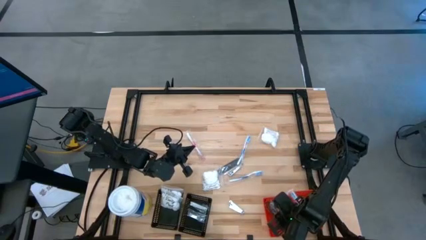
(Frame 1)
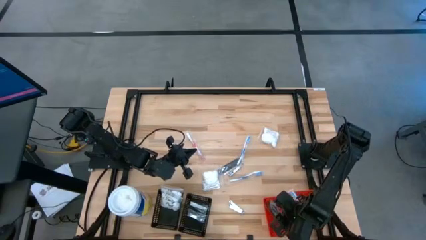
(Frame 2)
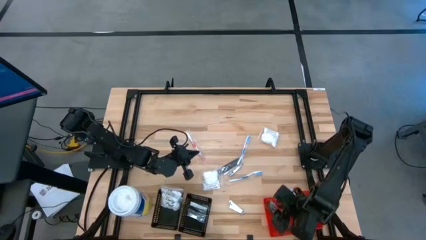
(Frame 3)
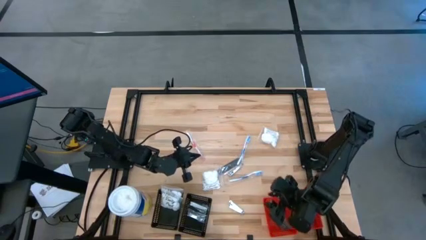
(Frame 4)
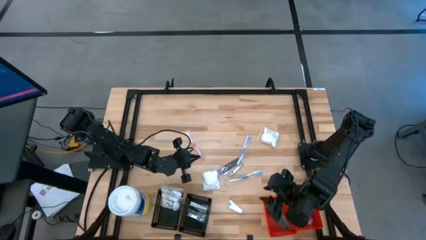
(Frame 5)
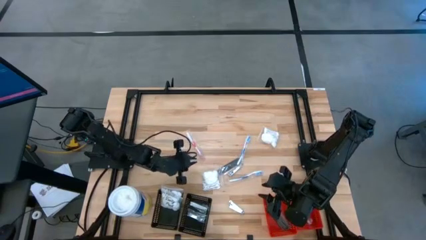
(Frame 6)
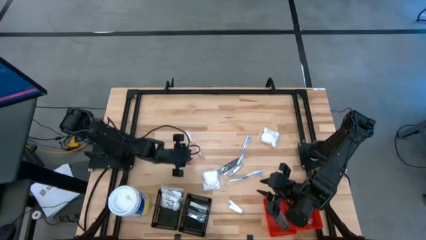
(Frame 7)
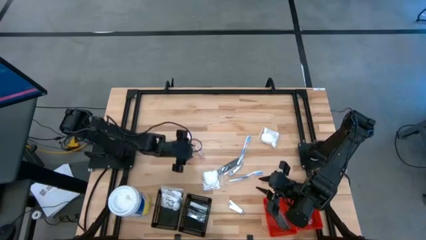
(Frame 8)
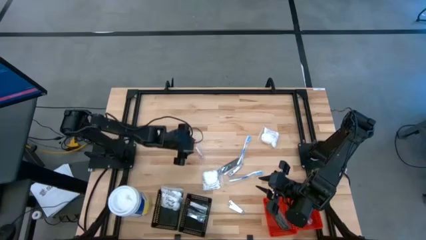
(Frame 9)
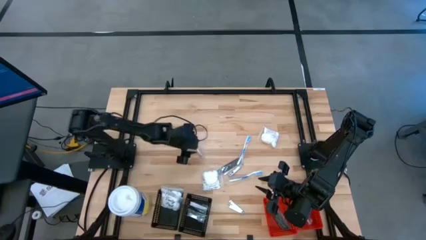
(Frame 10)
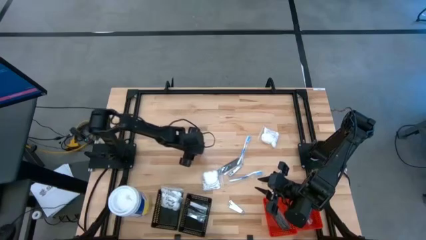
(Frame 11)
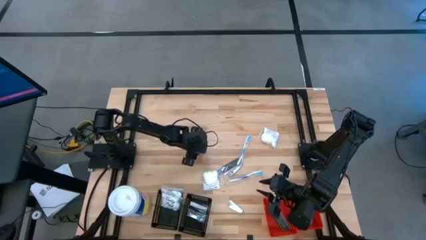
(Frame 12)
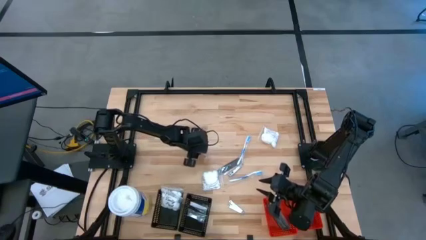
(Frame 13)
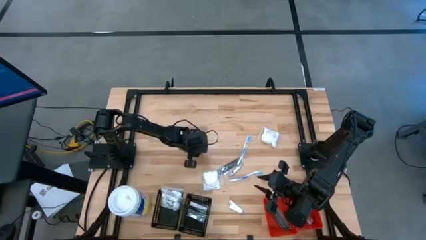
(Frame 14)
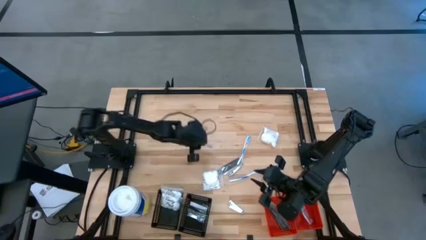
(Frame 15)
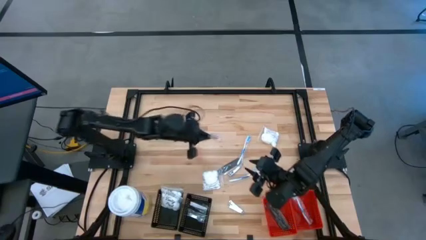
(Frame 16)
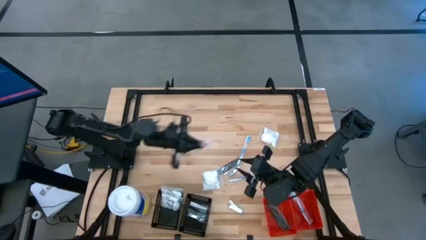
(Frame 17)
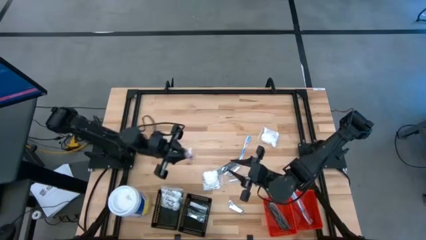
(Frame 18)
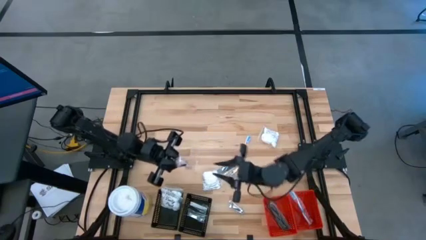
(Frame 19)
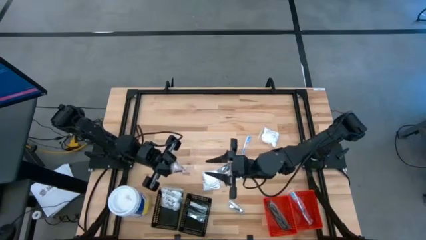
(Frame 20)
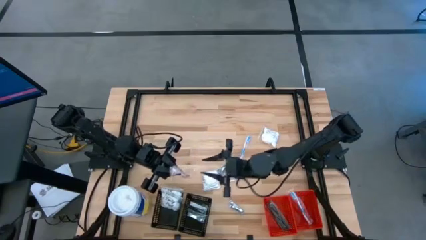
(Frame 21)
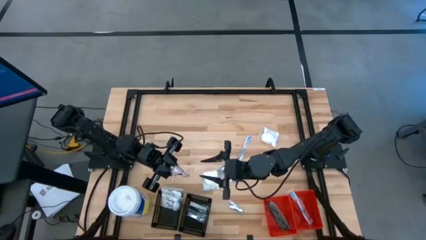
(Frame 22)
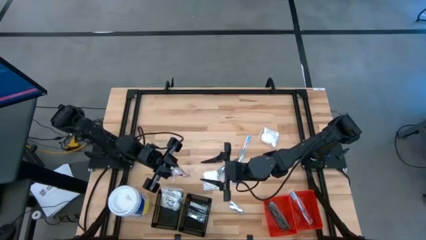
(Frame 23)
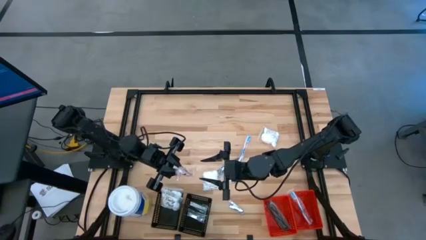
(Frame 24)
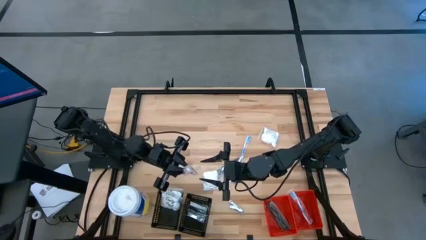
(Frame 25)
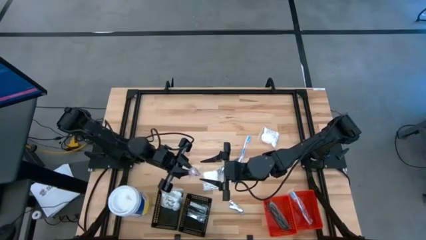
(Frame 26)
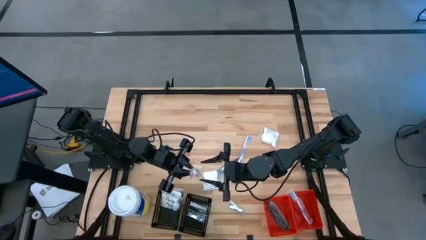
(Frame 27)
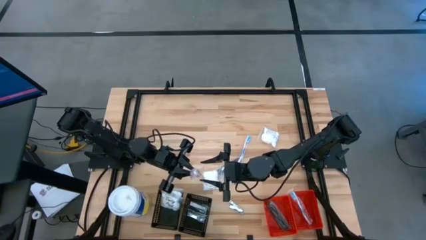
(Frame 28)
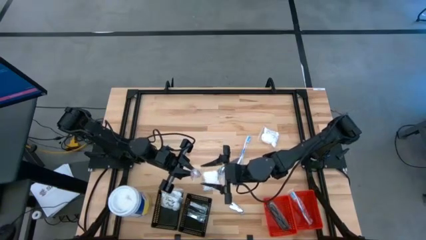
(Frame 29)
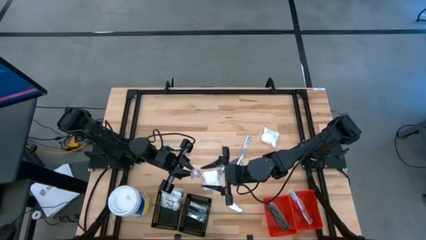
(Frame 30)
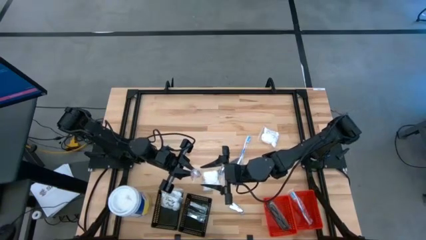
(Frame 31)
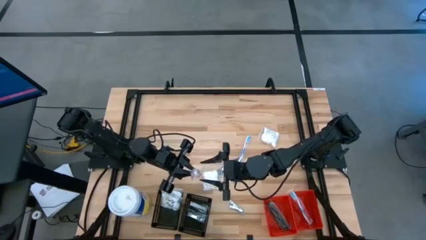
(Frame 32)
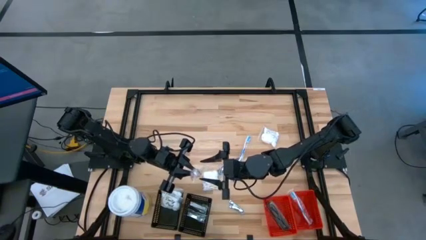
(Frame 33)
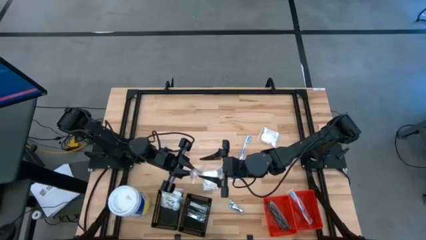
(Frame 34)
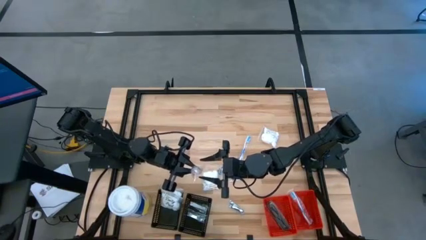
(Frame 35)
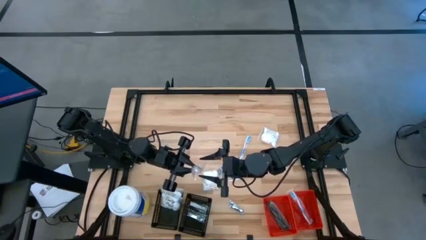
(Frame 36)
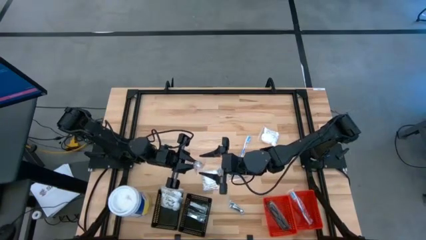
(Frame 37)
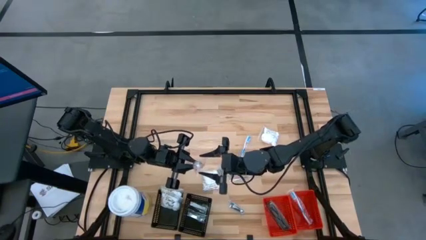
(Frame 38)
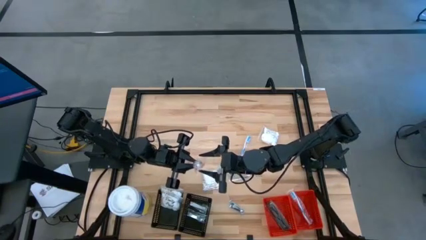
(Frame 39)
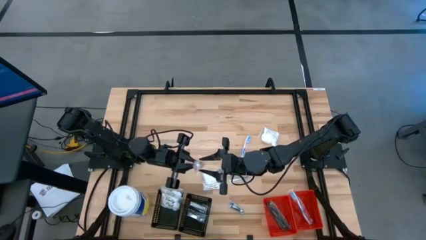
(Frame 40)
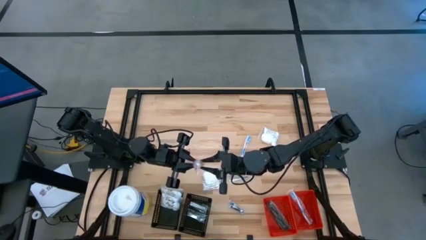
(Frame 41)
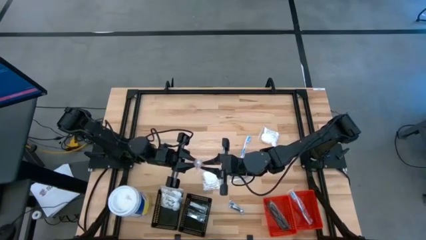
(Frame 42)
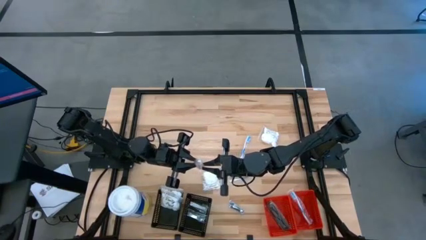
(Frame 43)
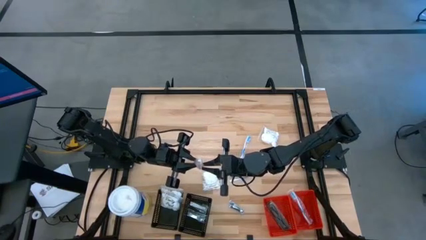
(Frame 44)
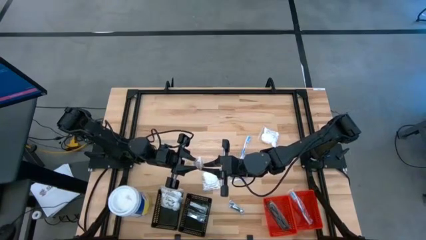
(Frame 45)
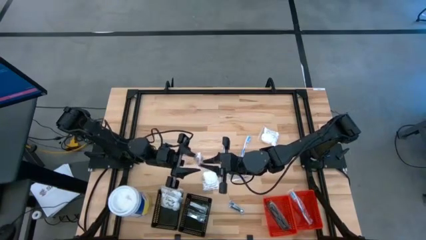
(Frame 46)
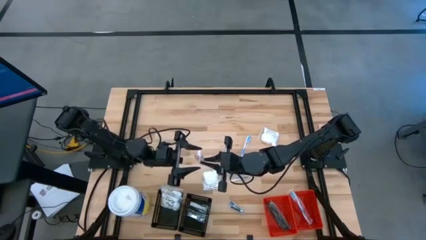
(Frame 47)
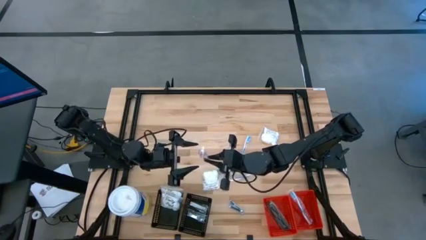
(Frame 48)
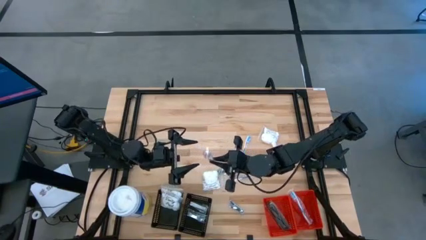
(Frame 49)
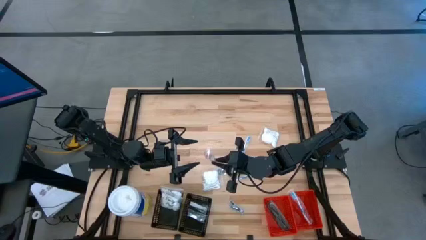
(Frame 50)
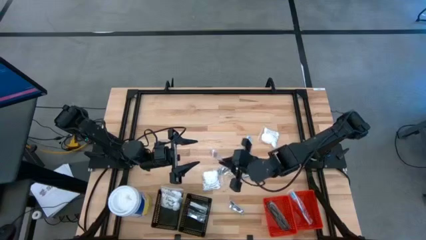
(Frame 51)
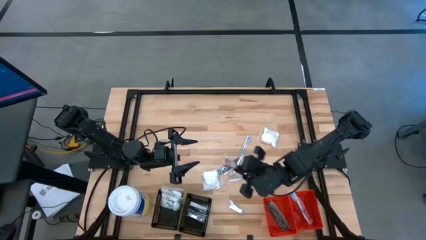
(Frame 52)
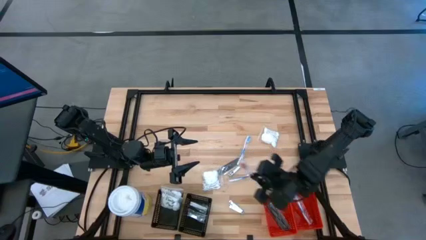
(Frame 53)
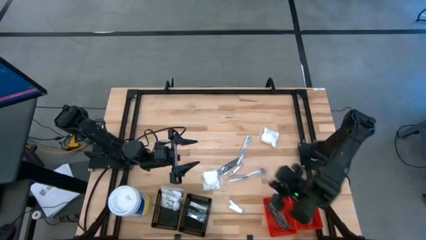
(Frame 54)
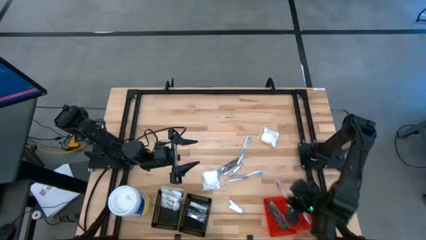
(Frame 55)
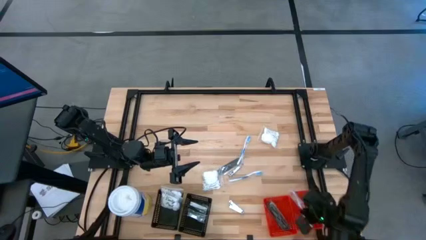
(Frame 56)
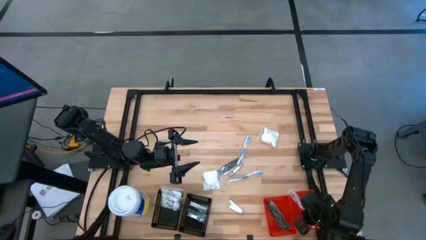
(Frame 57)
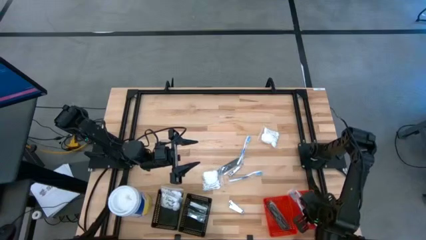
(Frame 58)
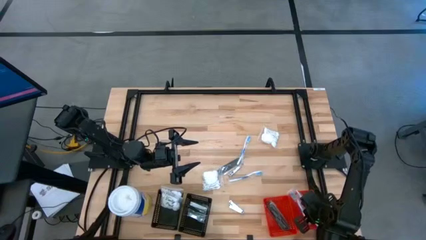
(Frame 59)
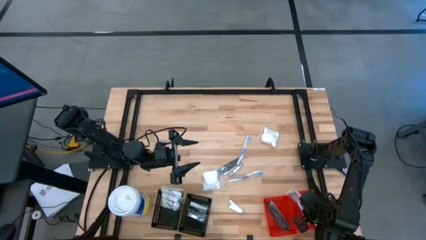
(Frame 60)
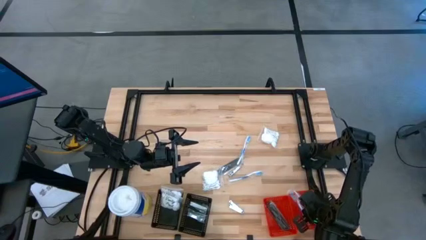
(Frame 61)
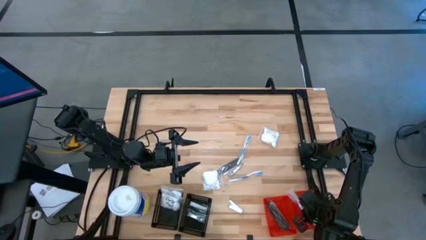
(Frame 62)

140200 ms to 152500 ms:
Task: Pick & Place Travel size toiletries
Put the red toothbrush into the right red bin

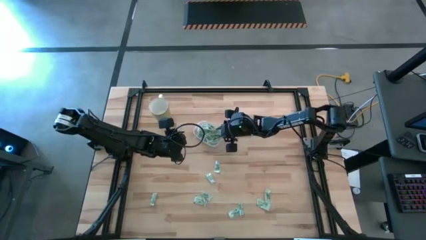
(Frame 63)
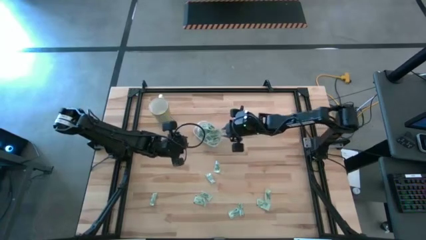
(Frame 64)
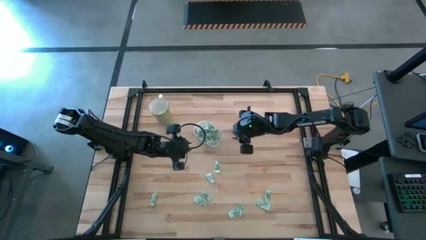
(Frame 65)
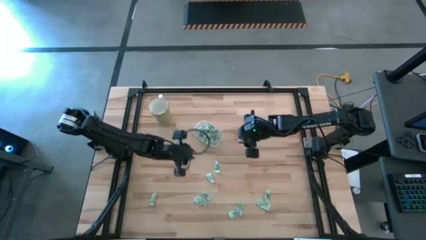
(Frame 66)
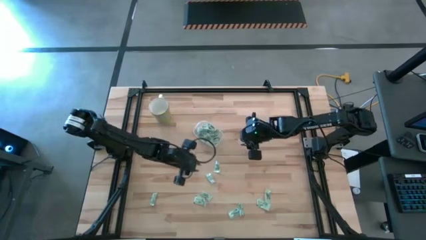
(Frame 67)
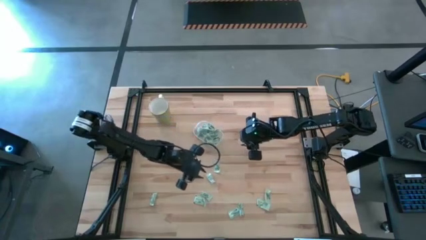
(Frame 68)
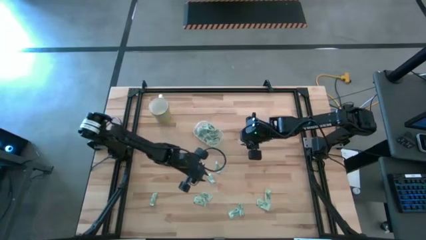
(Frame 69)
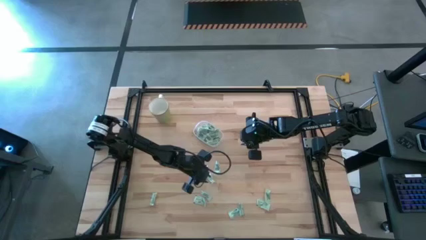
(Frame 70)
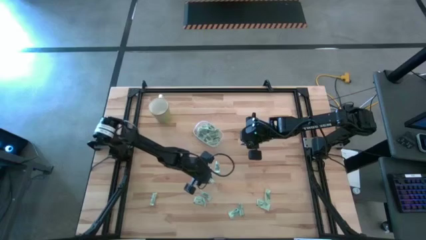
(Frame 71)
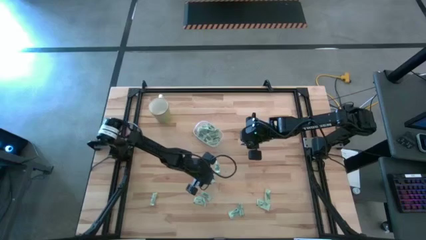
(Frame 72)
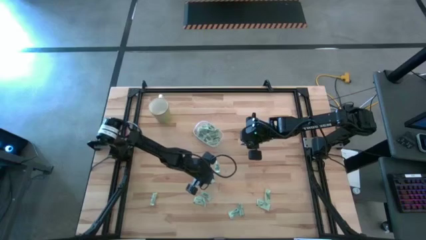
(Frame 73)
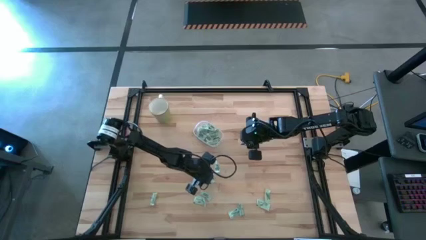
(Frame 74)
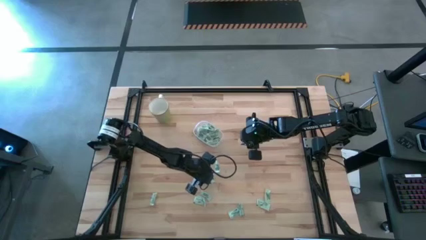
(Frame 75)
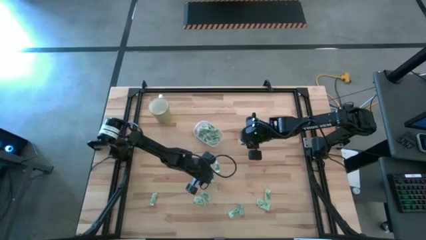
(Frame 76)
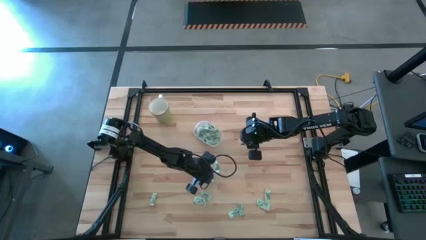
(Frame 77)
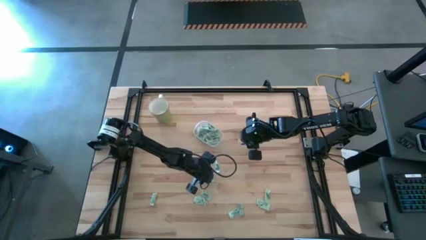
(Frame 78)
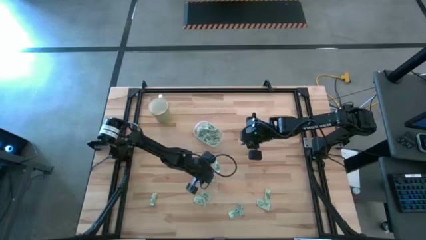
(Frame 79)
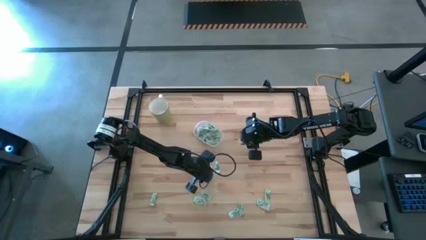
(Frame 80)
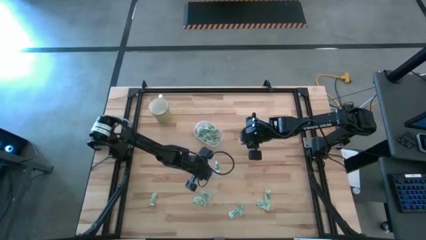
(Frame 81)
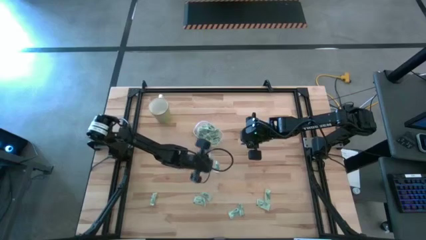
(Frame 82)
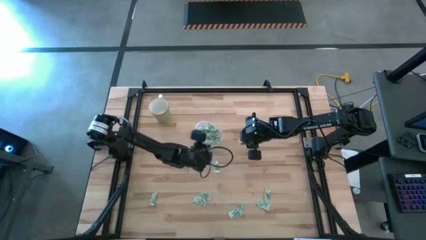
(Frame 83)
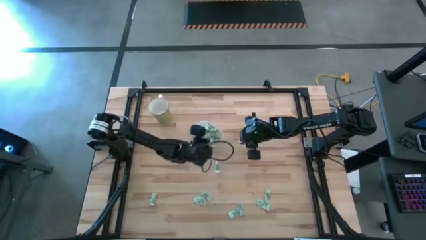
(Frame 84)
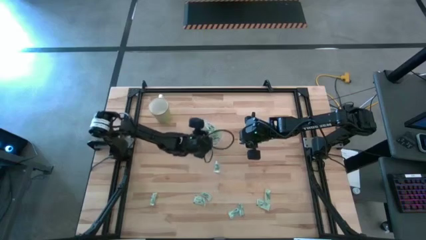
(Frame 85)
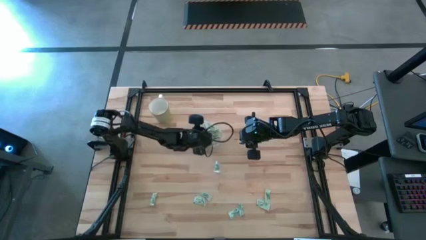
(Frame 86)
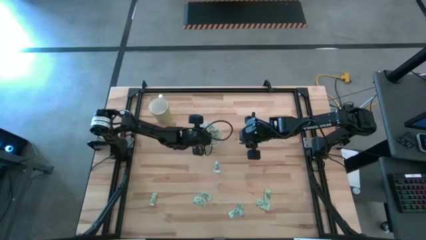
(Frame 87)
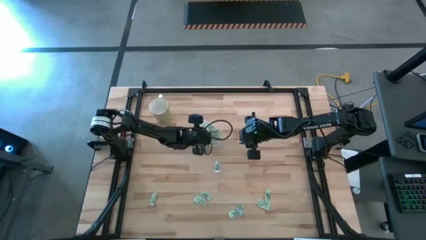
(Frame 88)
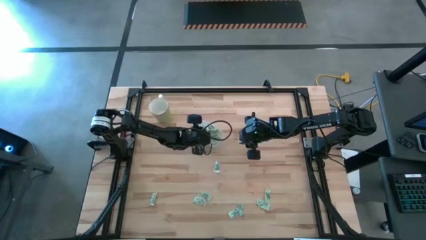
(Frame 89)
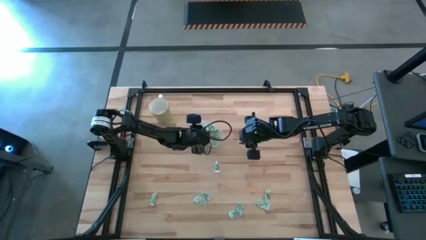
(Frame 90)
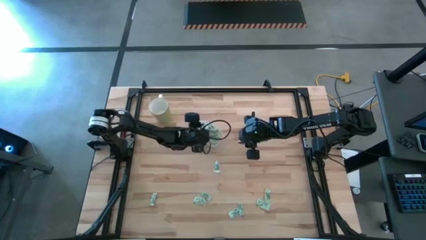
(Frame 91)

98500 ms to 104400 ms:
Task: Pick and place Stevia / Truvia into bins
Put the stevia packet into the transparent container
